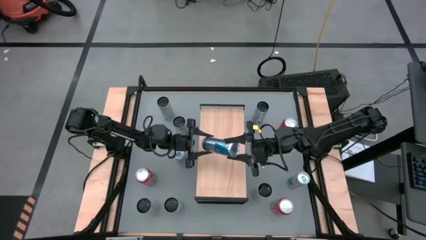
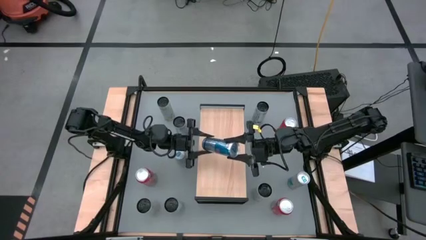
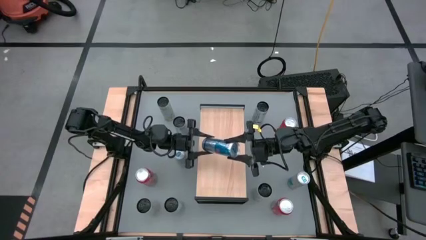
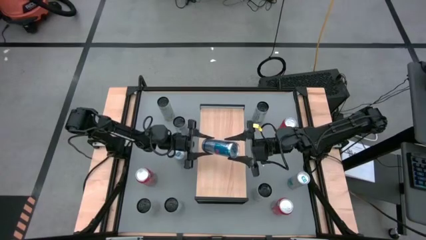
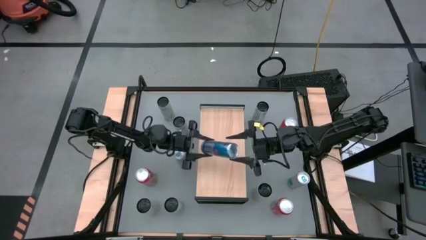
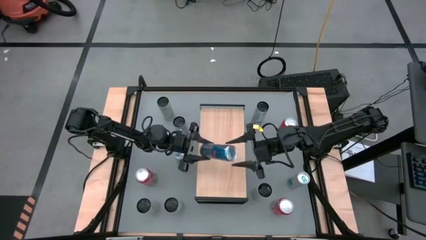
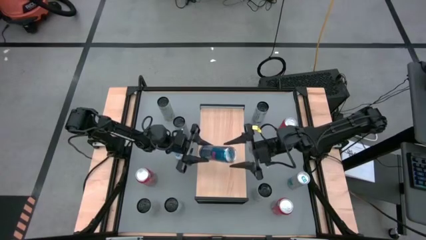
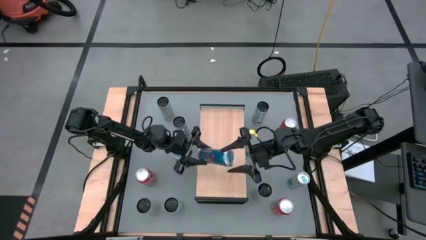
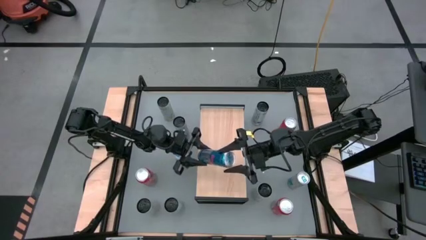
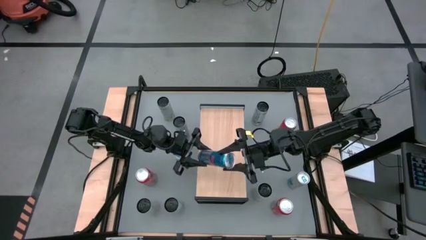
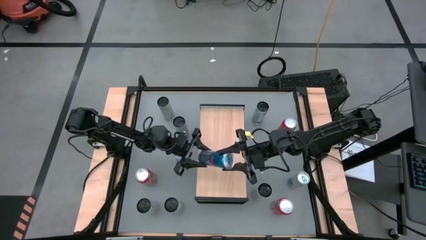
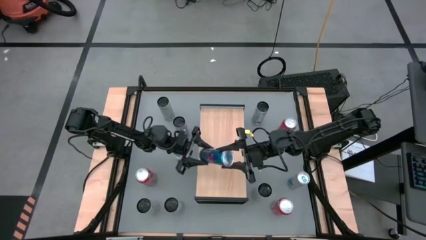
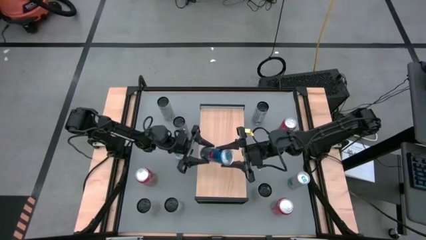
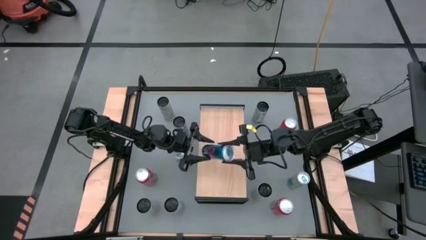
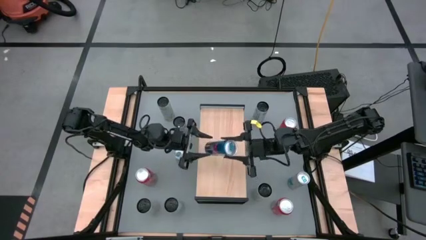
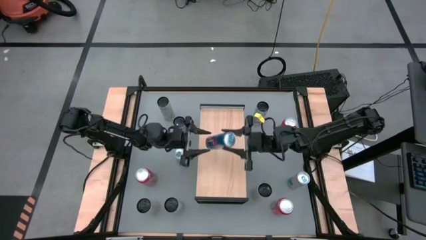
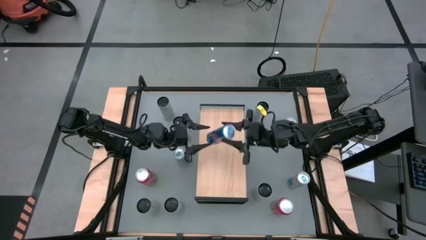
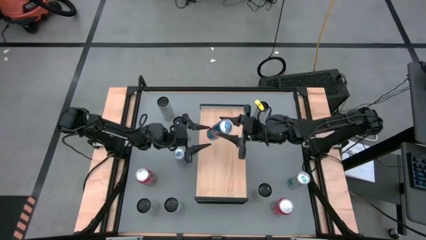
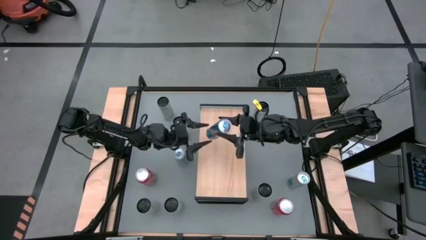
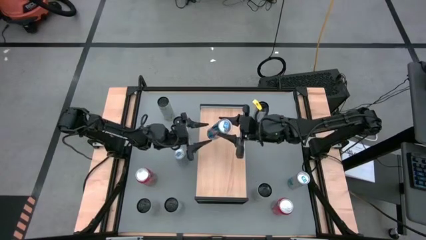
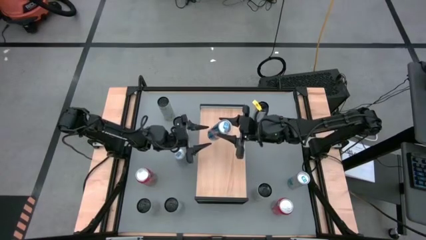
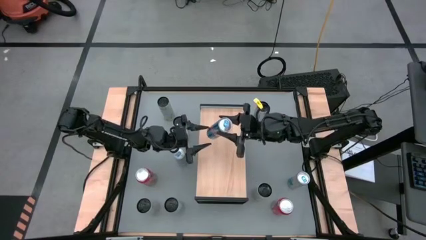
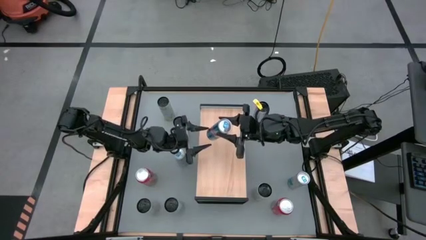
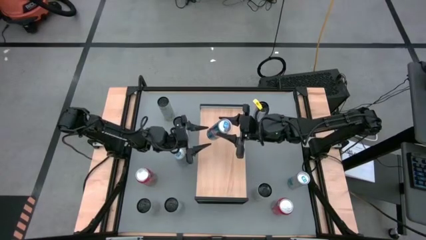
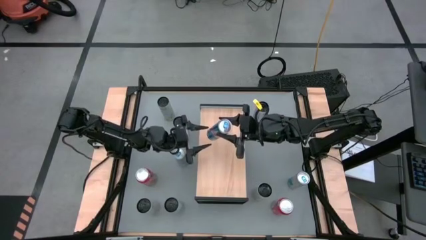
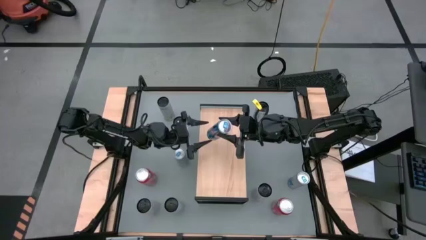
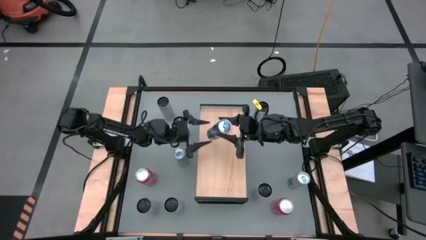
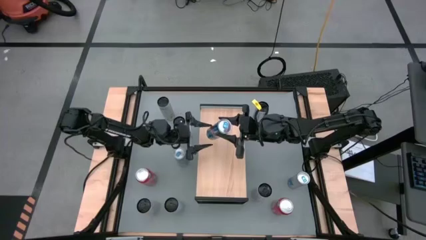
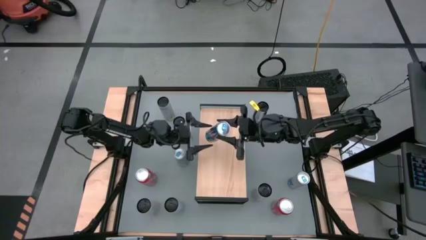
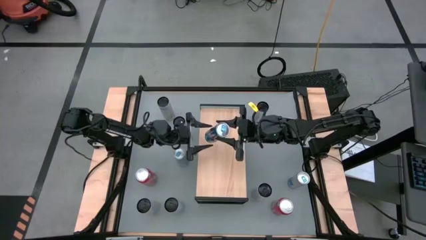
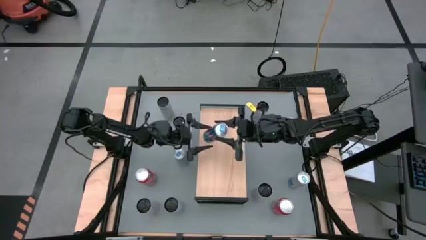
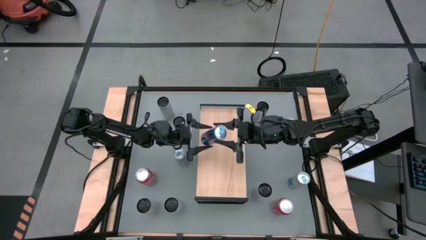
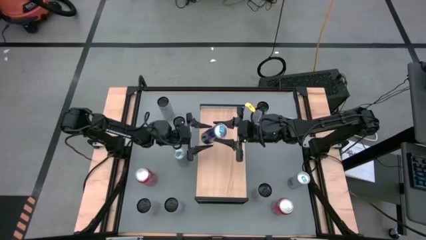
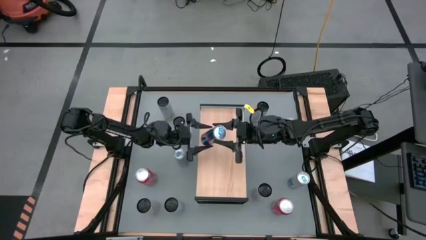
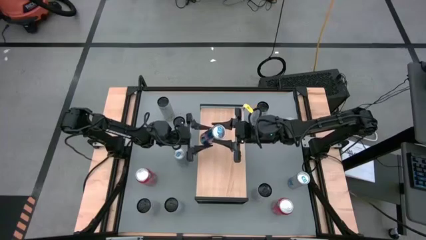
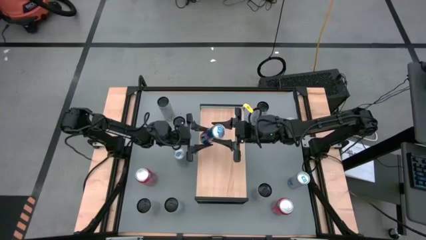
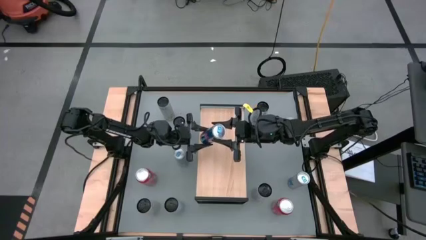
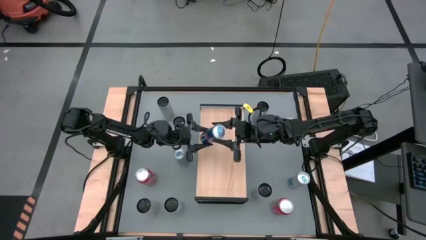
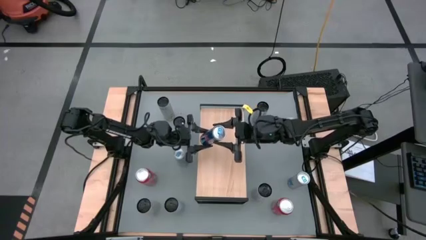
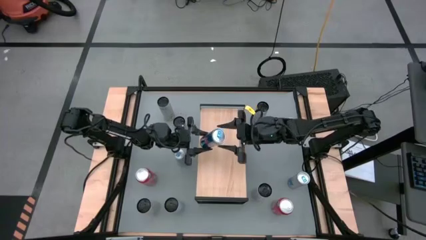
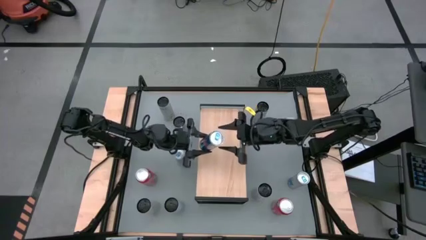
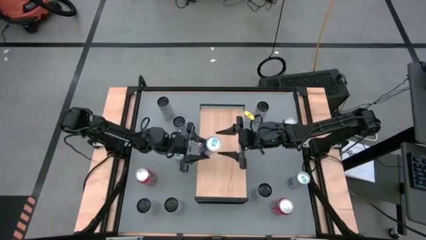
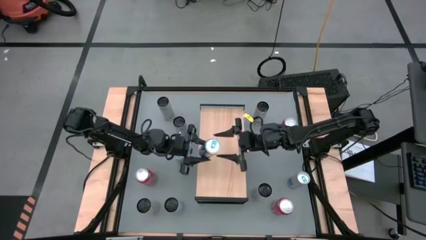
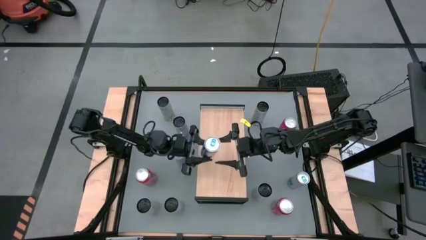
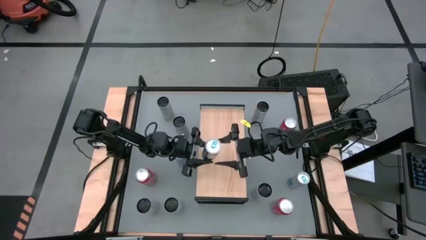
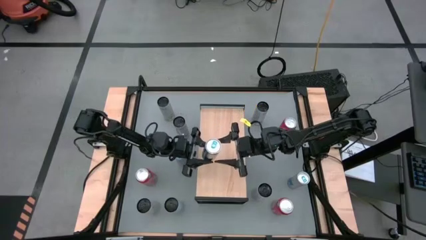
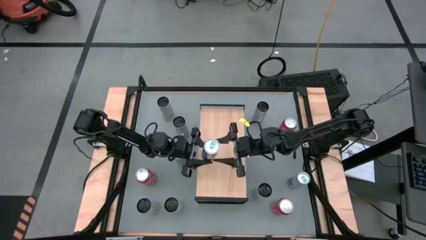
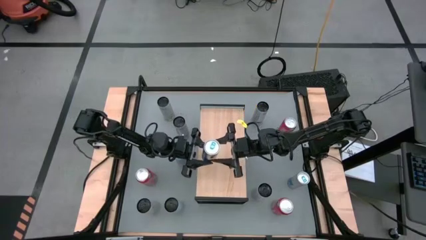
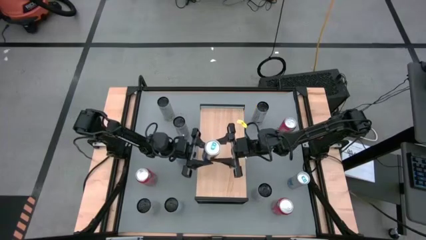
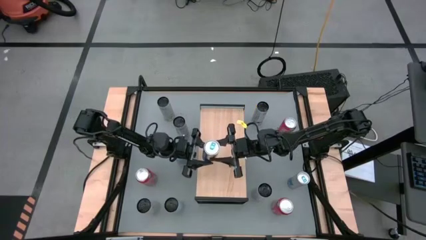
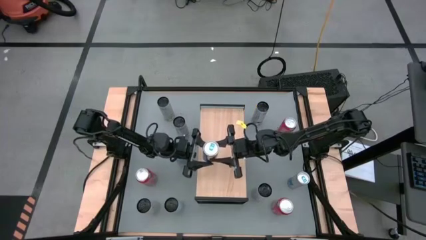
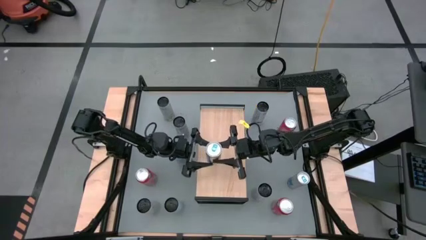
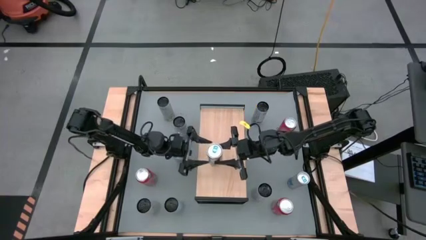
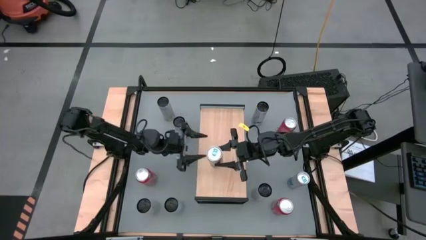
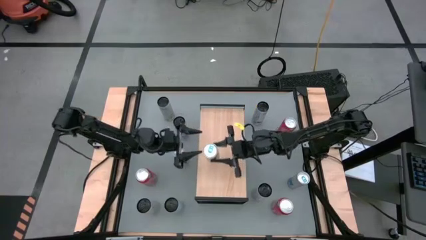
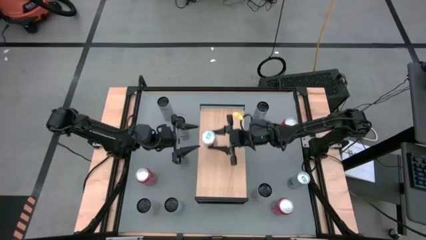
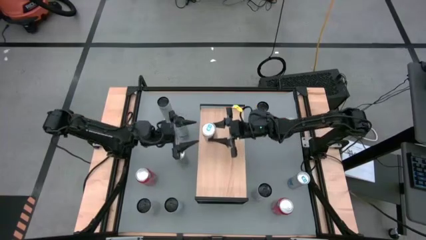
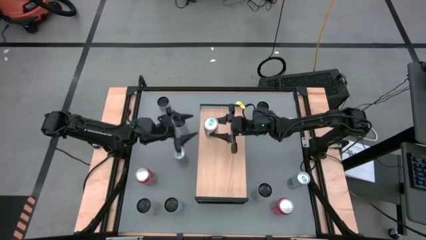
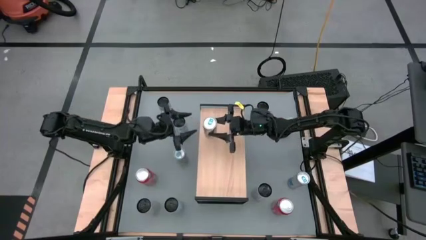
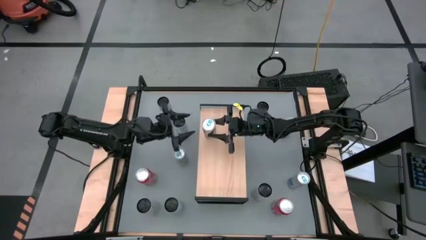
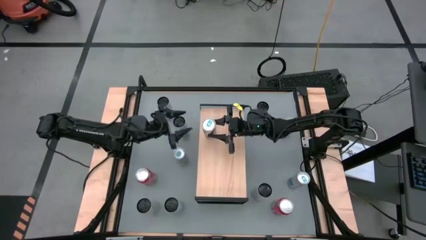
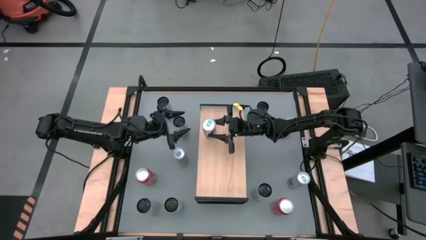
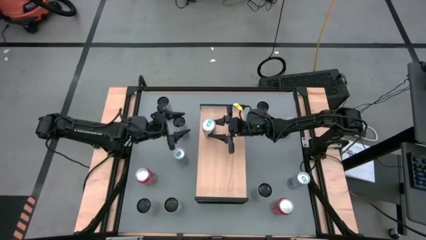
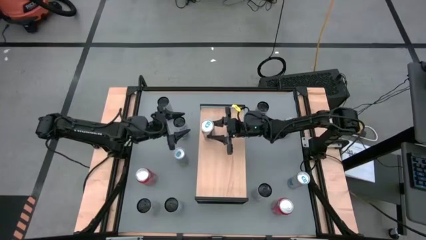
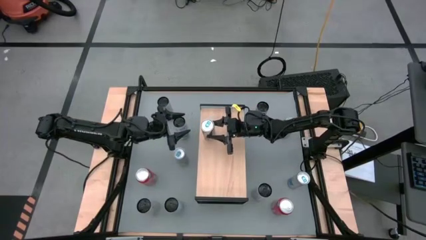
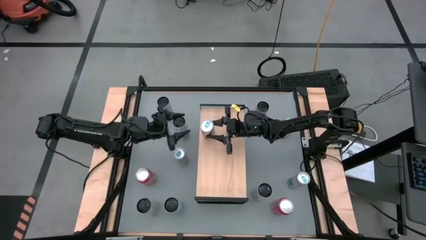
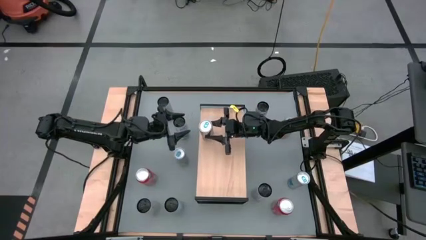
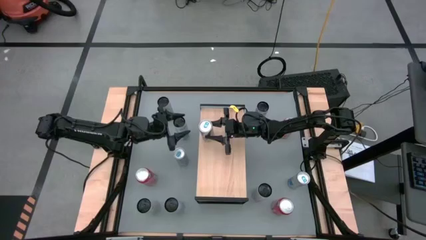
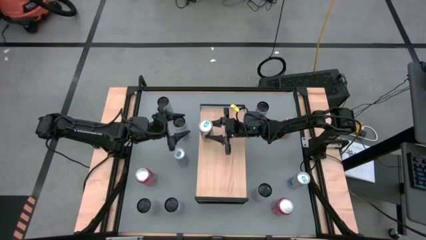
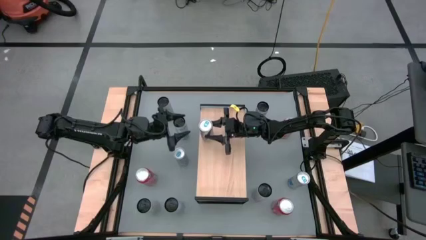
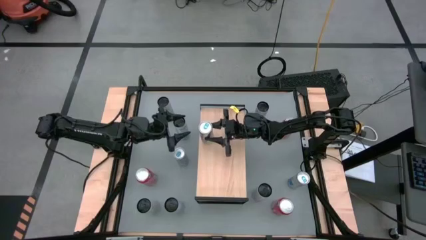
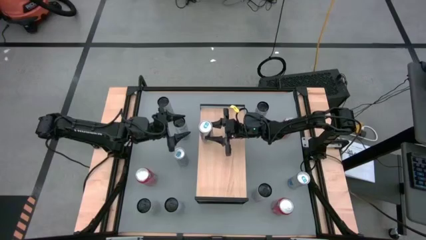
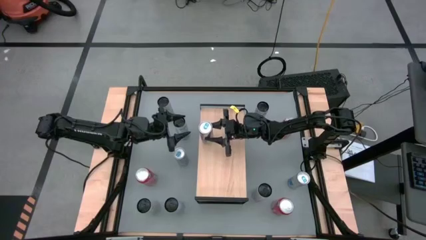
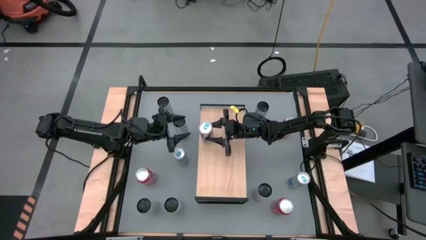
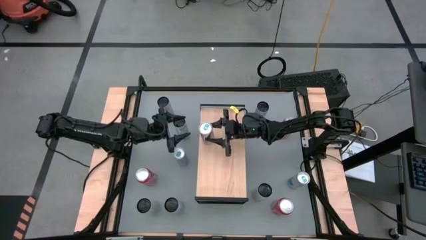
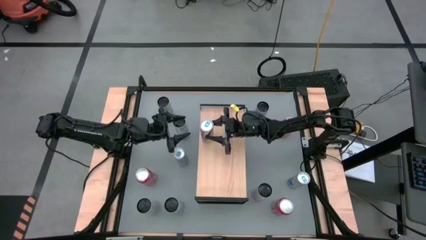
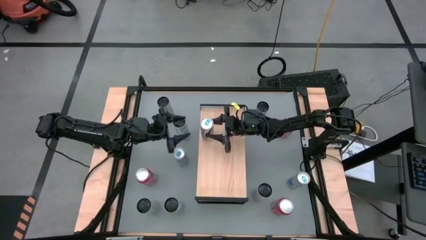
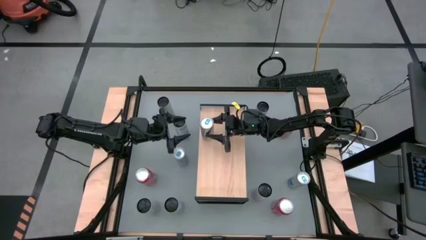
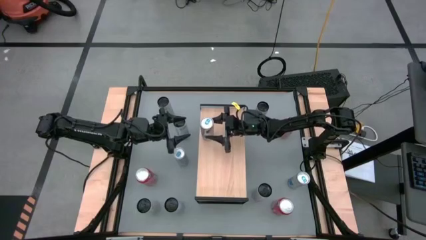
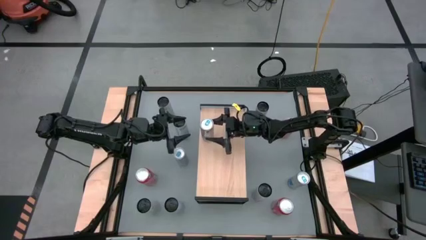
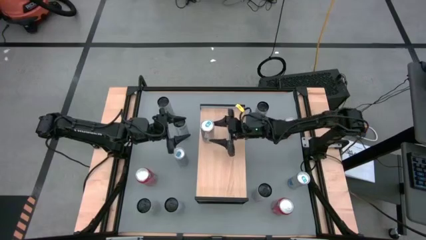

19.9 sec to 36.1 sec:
Task: Place canned beverage on shelf
Put the middle right blue soda can on the shelf
